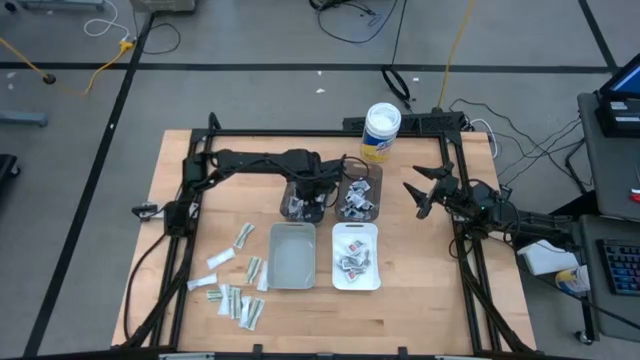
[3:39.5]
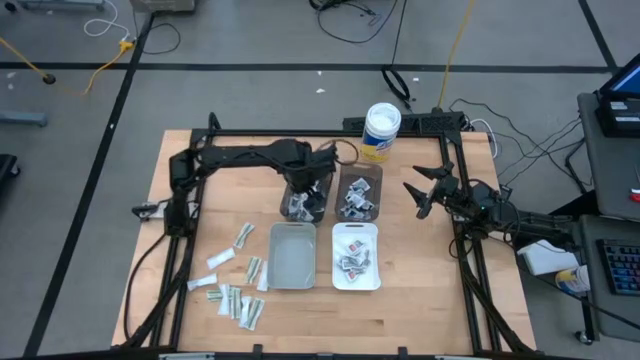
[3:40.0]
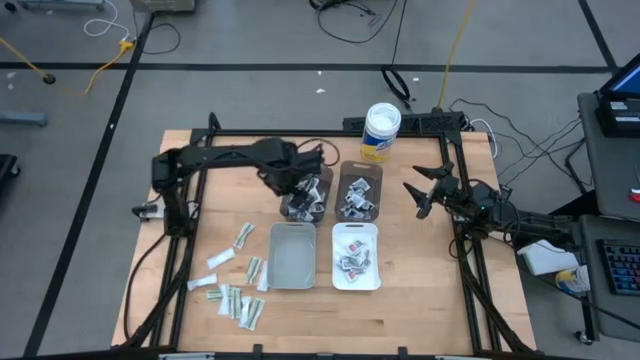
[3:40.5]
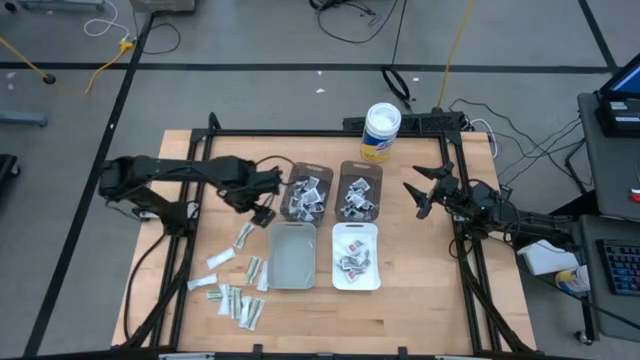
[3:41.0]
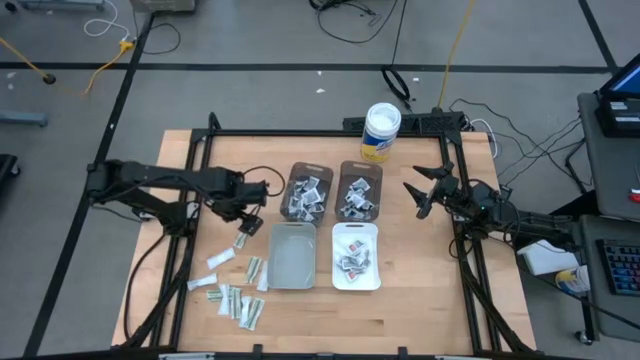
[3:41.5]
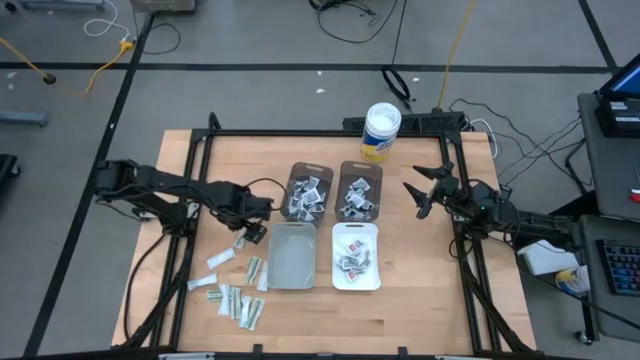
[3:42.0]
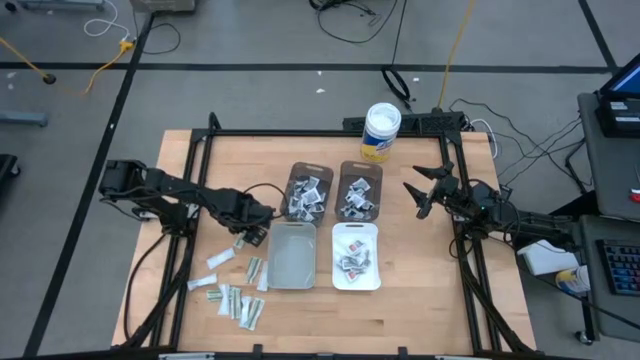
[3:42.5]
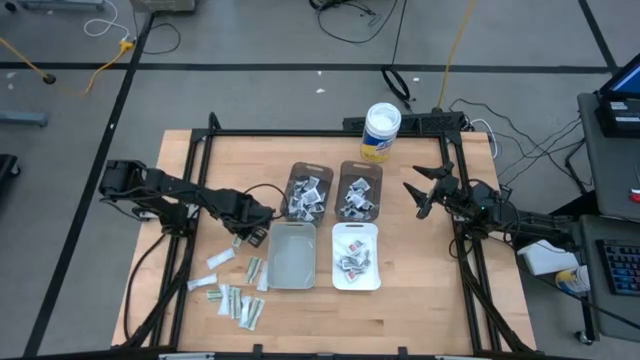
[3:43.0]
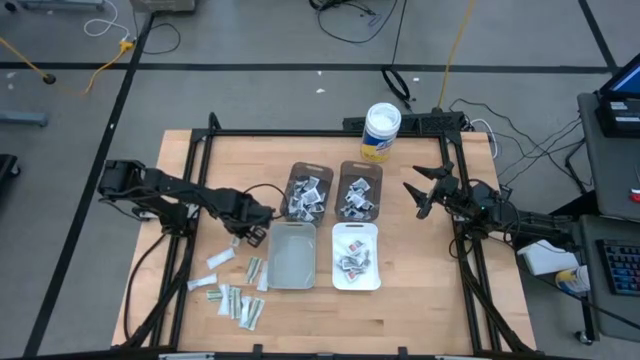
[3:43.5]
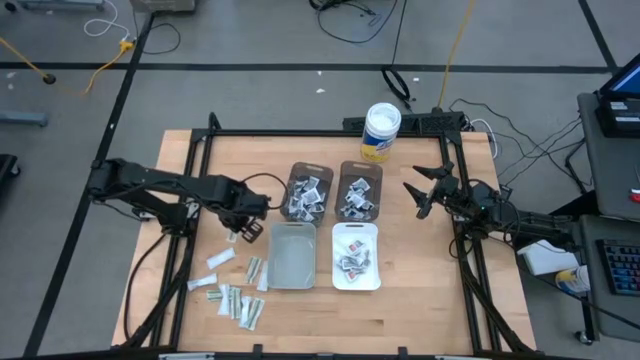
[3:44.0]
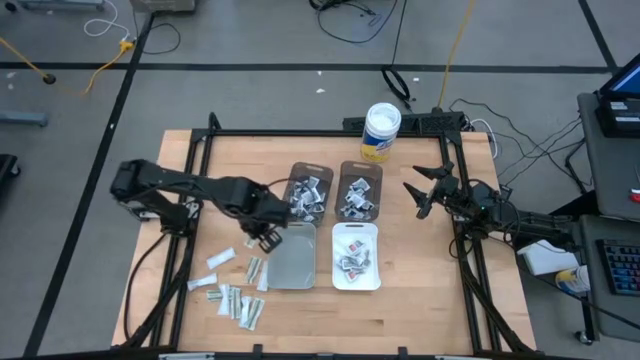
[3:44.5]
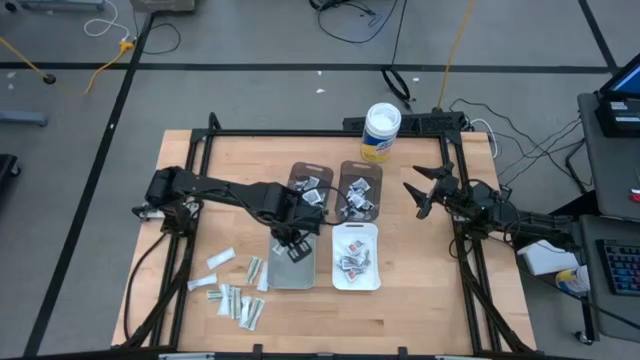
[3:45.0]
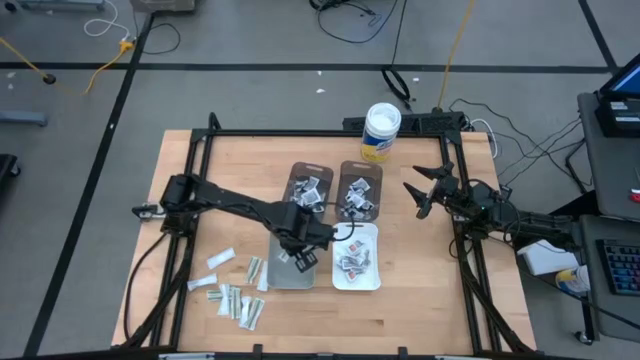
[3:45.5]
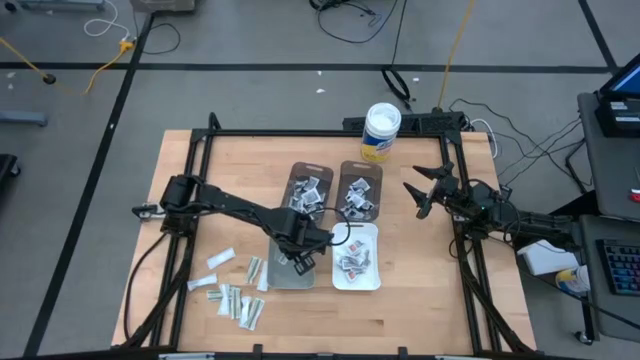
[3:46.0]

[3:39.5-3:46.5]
Task: Pick & Place First Aid Supplies
Put the green pad into the gray bin

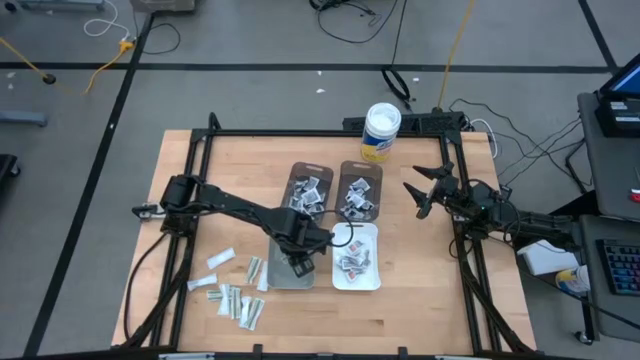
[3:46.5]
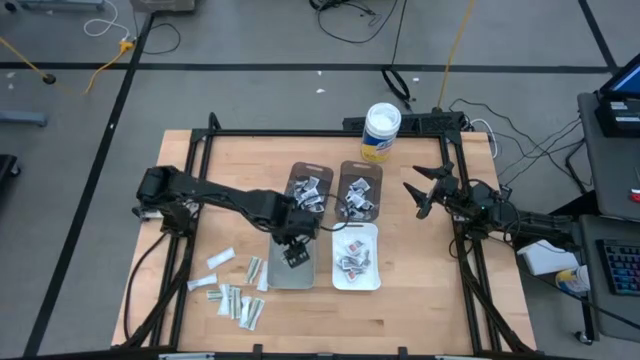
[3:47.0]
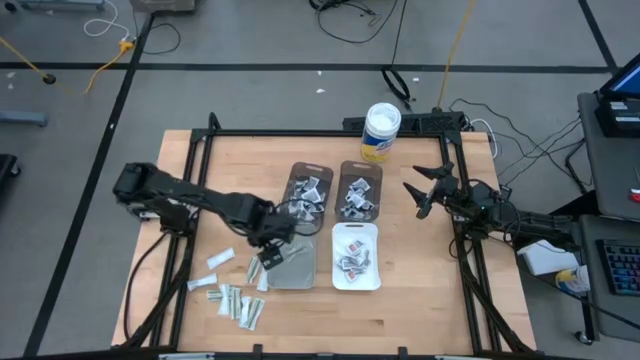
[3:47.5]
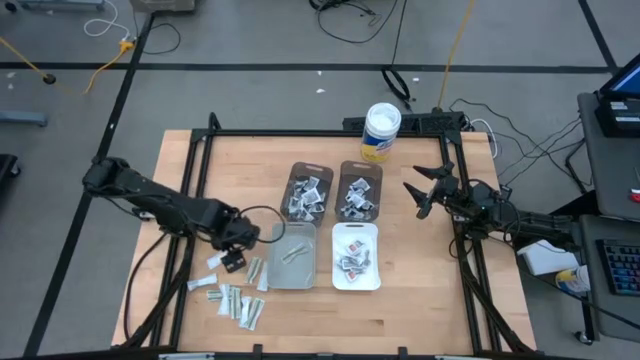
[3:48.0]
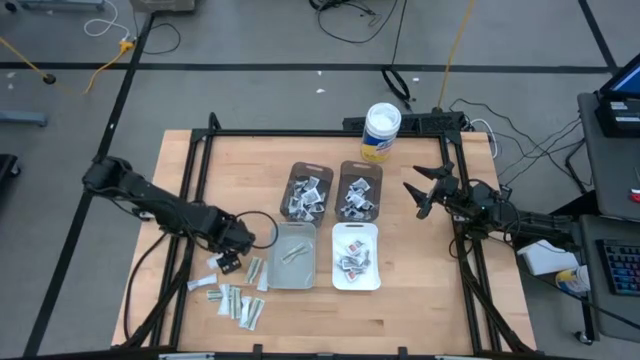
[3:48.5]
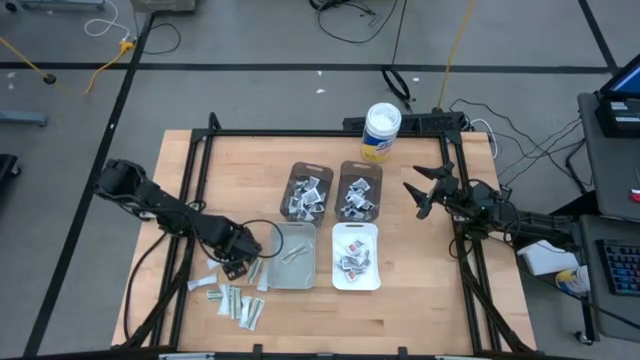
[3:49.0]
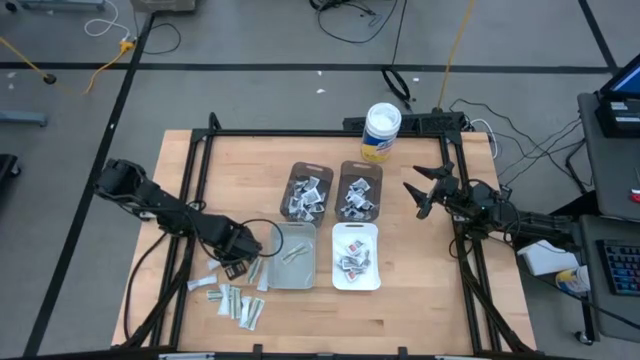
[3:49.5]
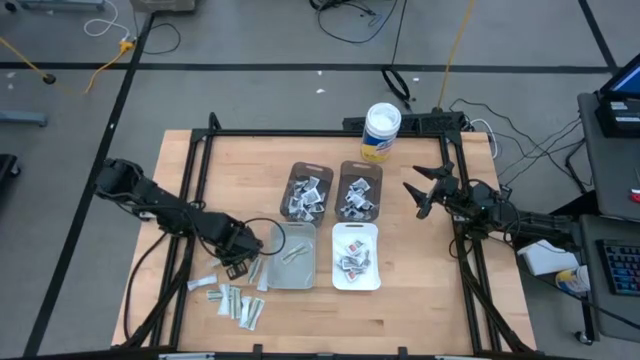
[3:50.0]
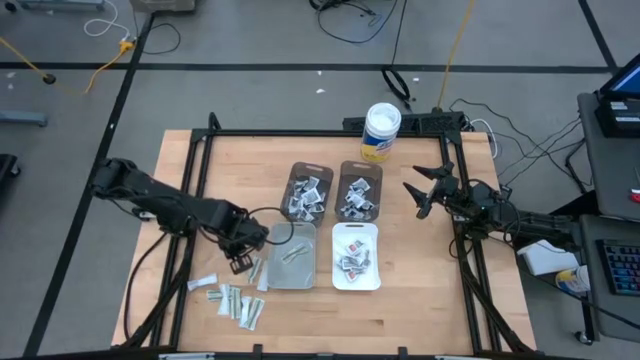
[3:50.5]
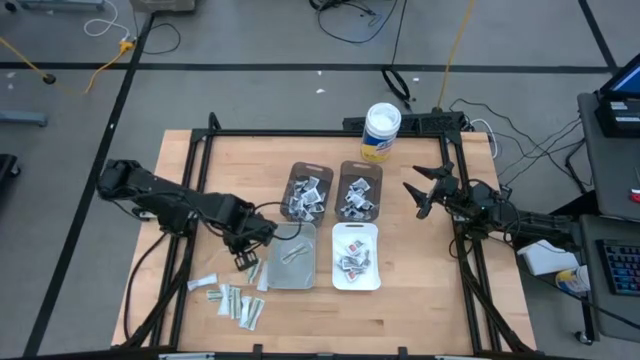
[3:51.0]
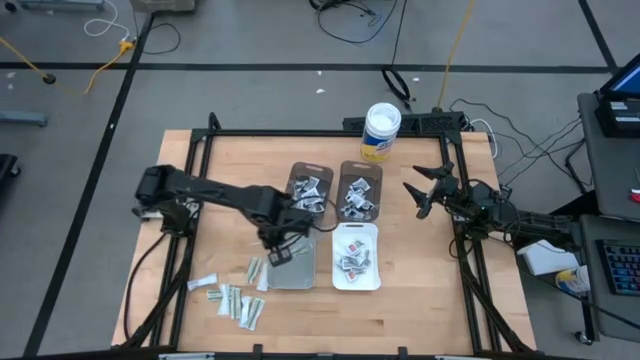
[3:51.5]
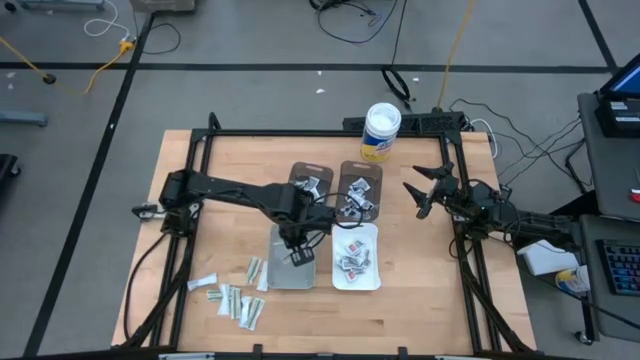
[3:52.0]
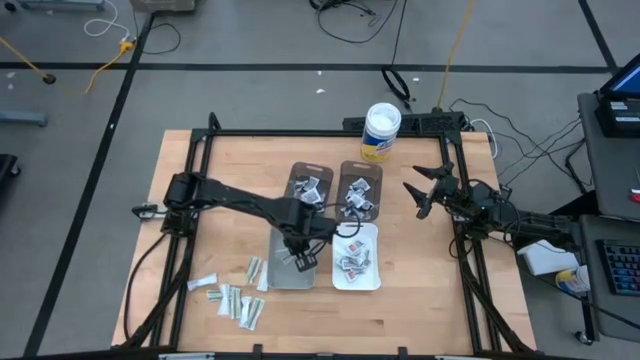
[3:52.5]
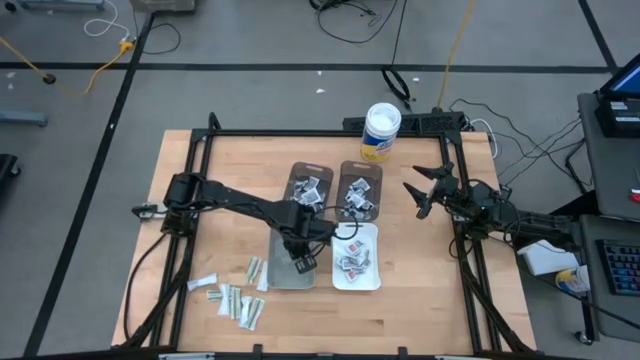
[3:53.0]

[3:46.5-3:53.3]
Put the green pad into the gray bin

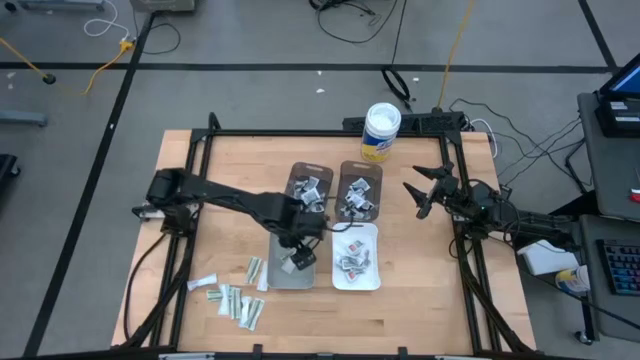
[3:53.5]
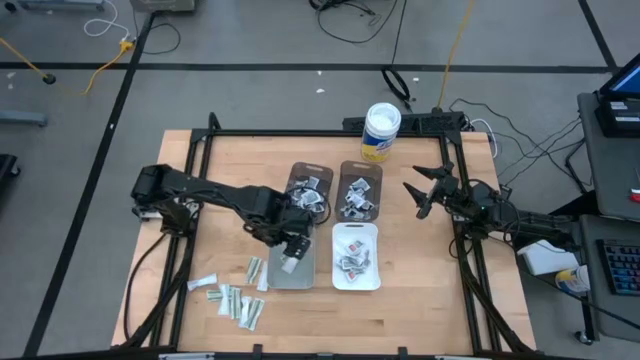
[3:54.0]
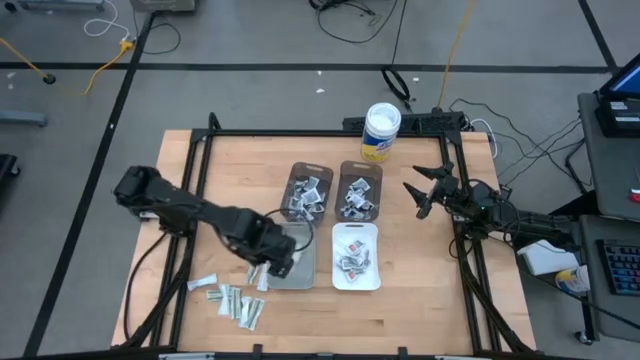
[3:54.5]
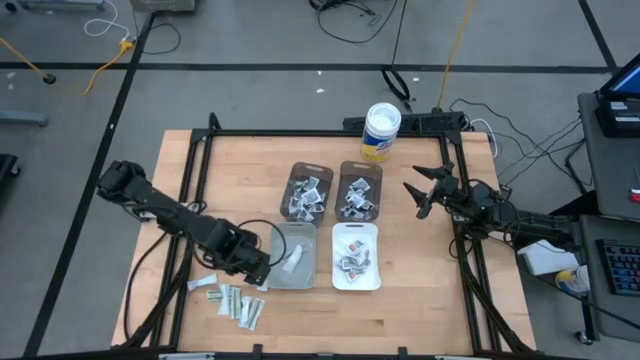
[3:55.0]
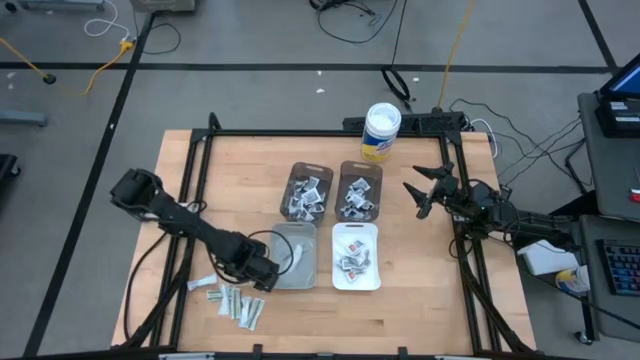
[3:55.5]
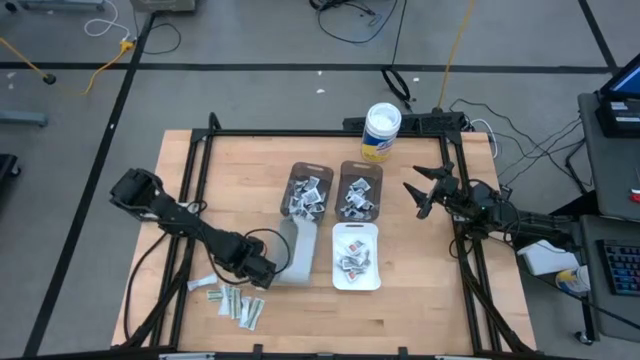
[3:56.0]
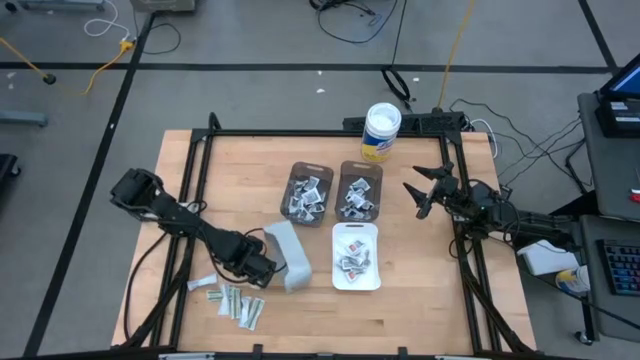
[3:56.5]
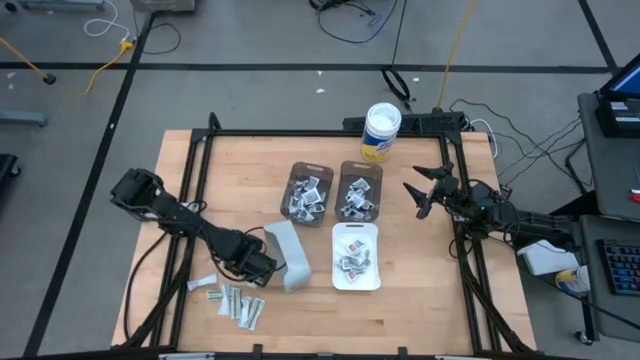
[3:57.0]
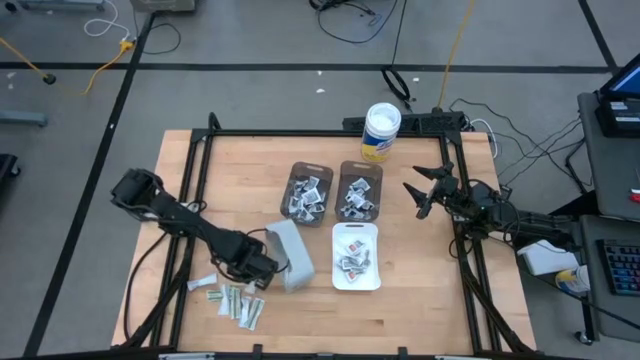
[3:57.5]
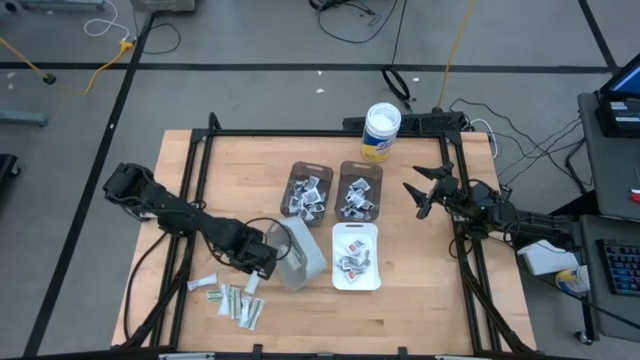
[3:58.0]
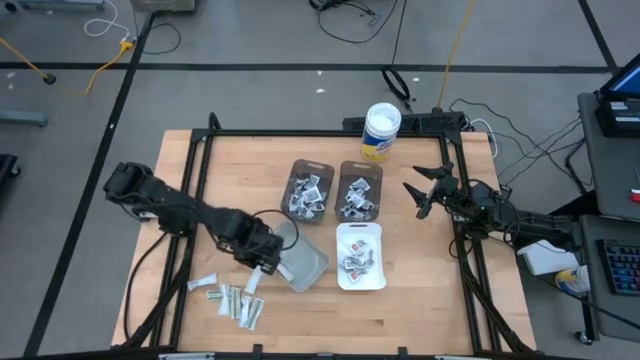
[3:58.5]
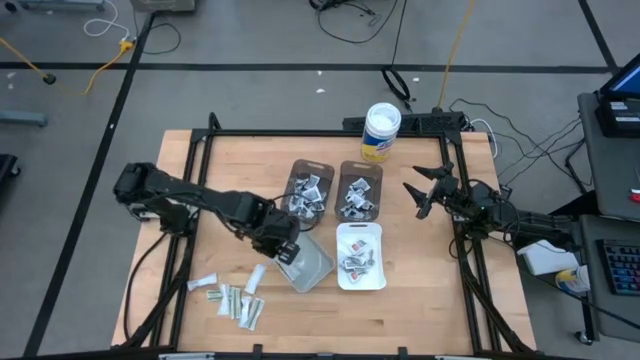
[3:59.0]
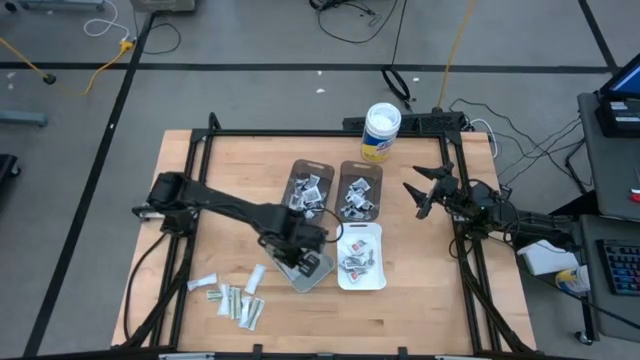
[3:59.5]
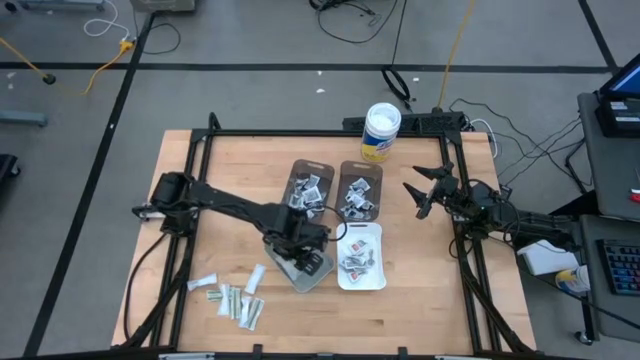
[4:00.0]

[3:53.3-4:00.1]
Put the green pad into the gray bin

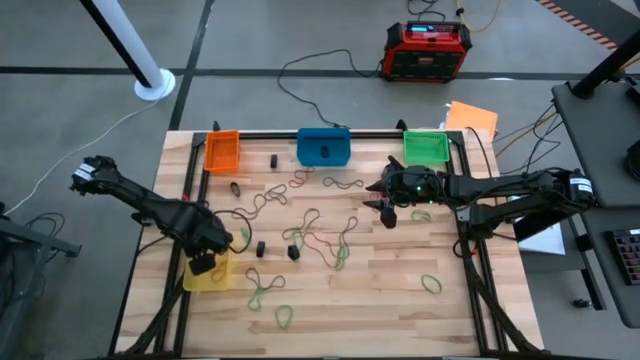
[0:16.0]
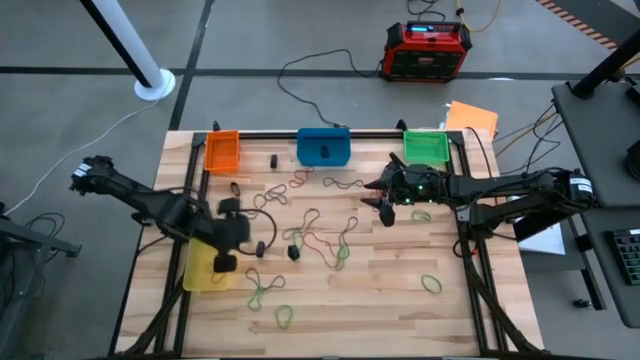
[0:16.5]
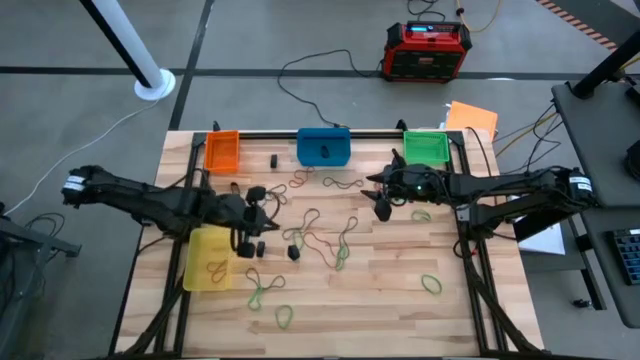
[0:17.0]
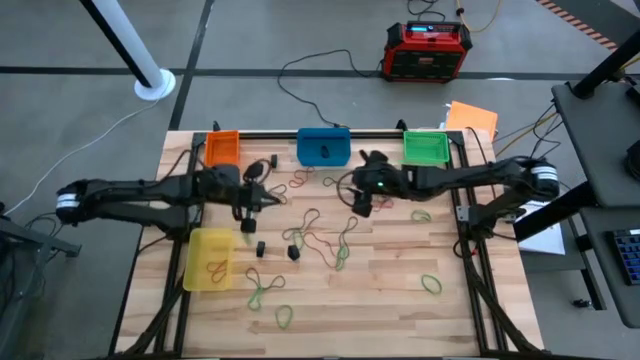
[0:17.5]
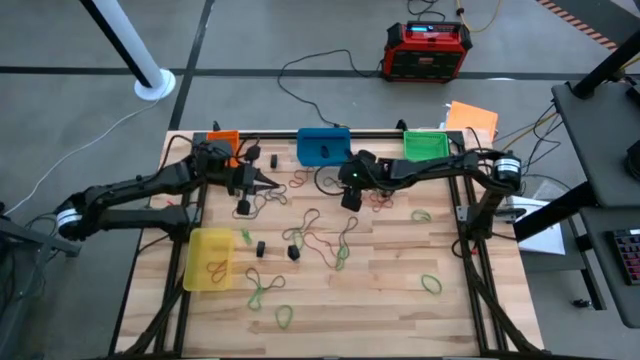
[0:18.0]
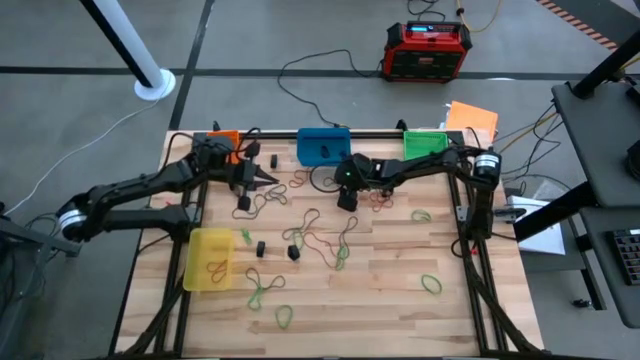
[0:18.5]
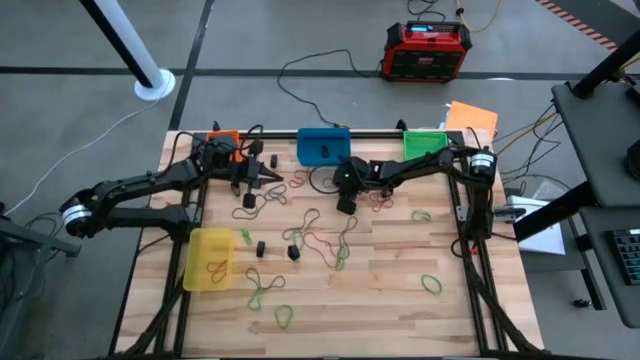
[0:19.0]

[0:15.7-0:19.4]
Task: Sort rubber bands into baskets
Put the violet rubber band into the green bin
